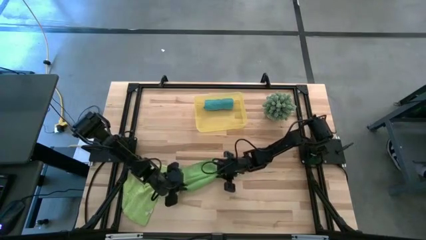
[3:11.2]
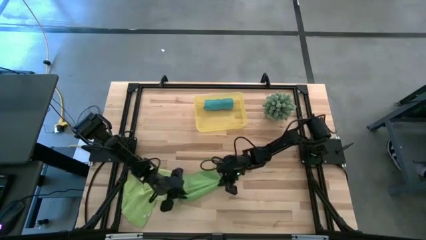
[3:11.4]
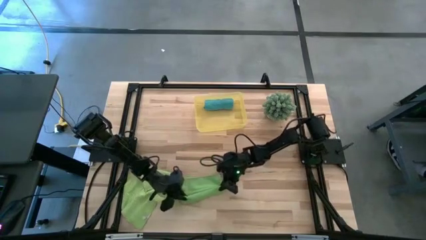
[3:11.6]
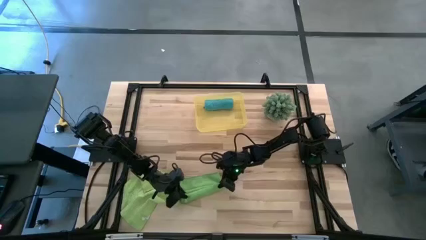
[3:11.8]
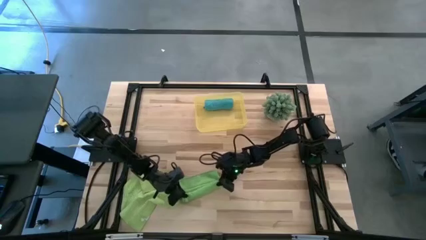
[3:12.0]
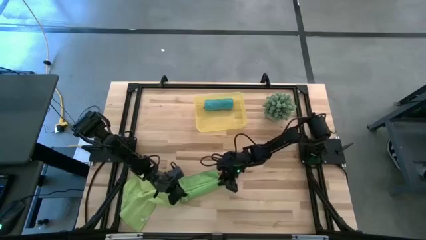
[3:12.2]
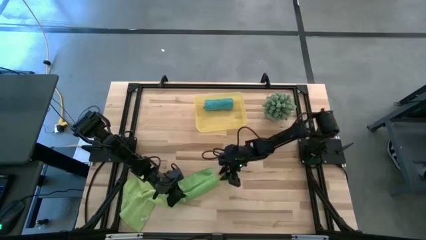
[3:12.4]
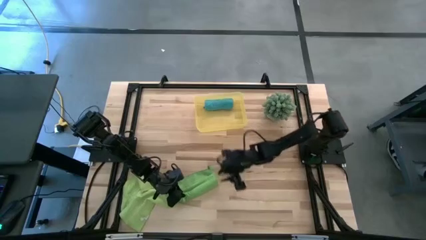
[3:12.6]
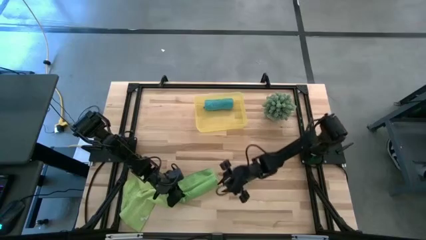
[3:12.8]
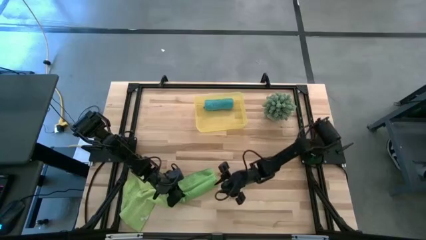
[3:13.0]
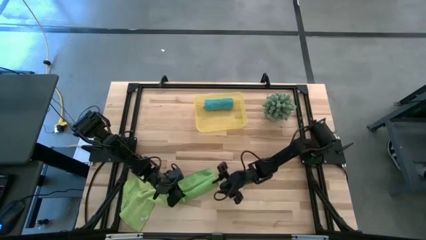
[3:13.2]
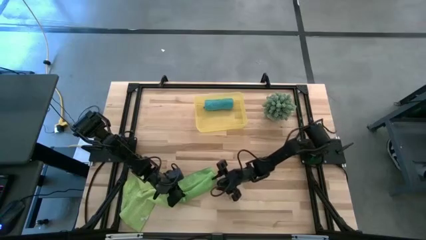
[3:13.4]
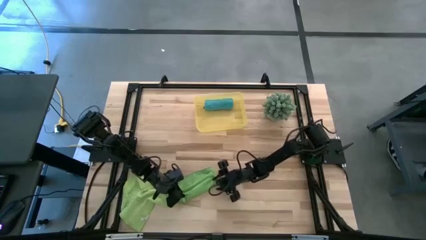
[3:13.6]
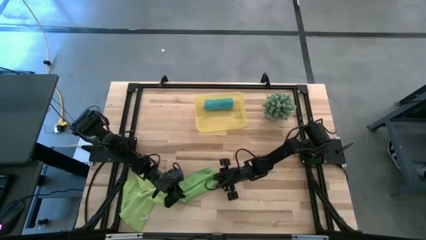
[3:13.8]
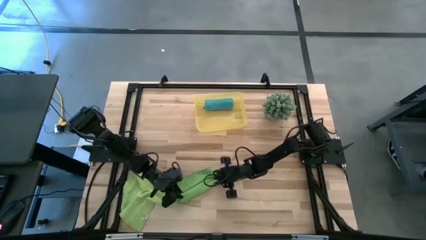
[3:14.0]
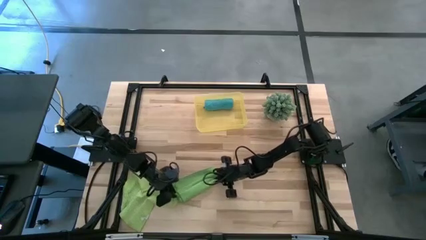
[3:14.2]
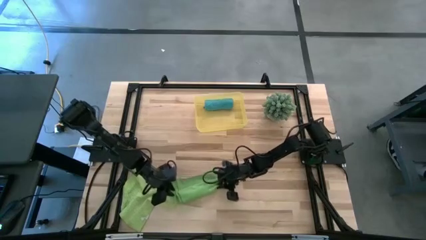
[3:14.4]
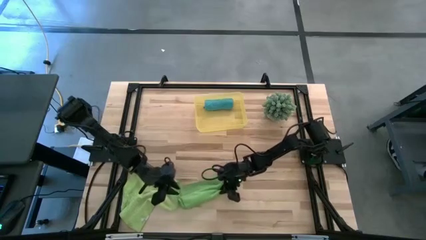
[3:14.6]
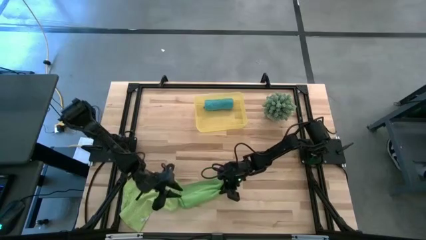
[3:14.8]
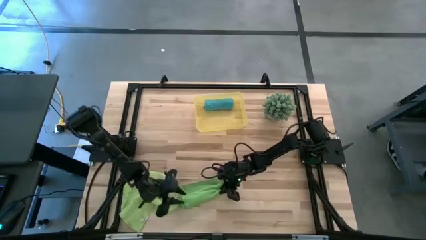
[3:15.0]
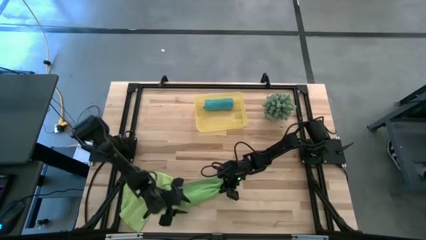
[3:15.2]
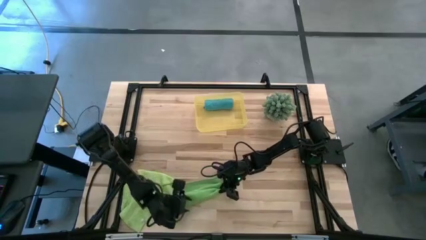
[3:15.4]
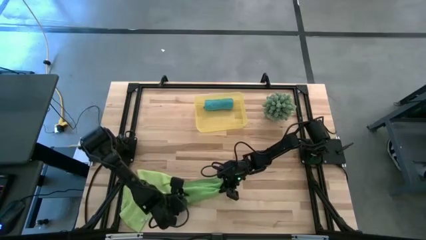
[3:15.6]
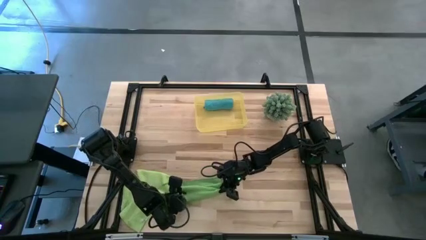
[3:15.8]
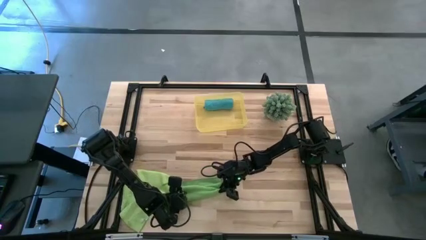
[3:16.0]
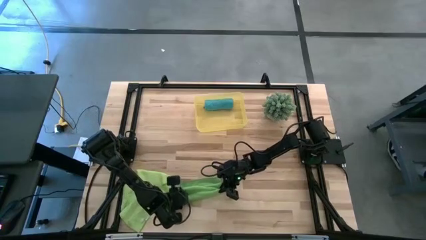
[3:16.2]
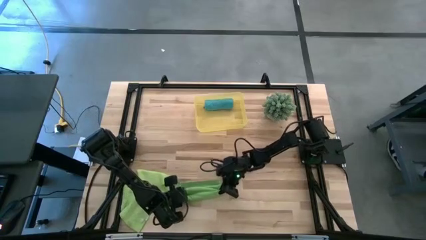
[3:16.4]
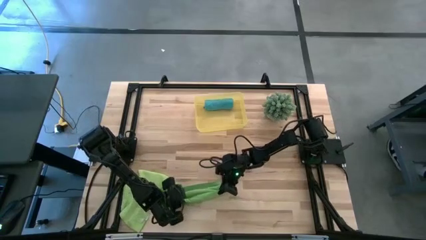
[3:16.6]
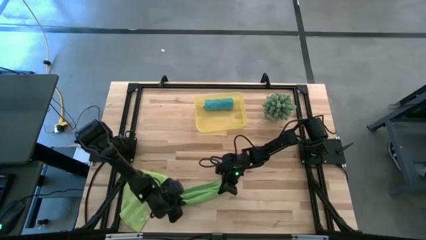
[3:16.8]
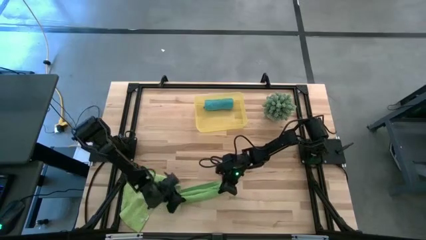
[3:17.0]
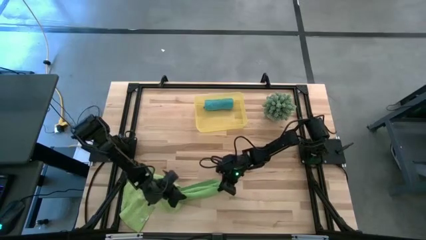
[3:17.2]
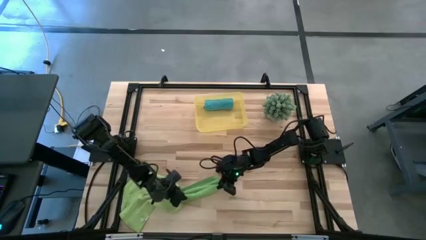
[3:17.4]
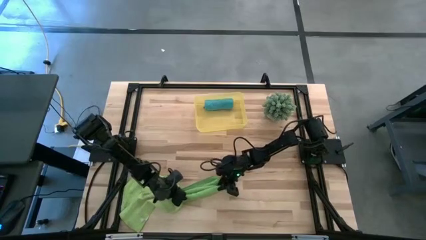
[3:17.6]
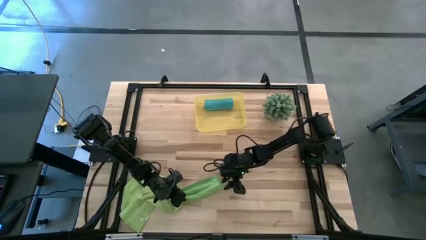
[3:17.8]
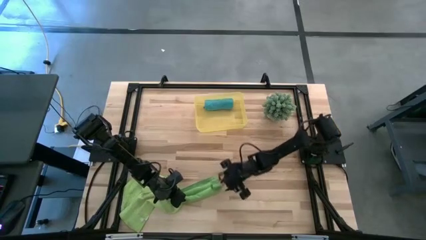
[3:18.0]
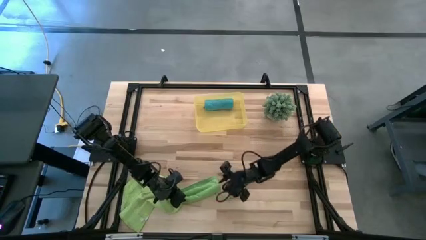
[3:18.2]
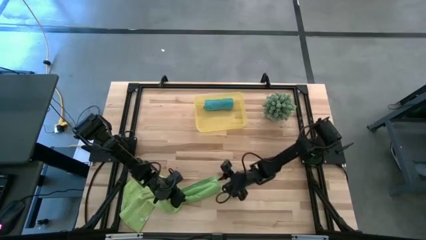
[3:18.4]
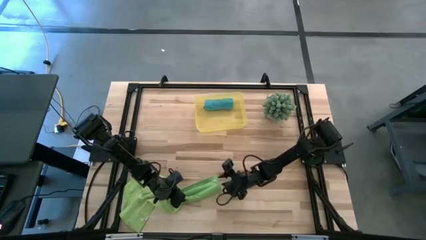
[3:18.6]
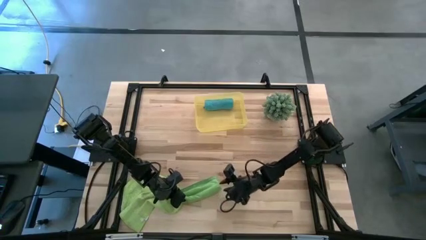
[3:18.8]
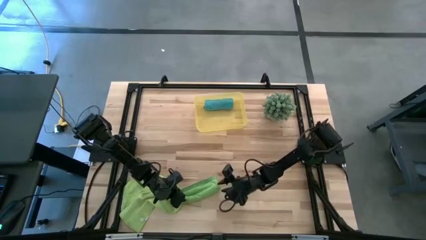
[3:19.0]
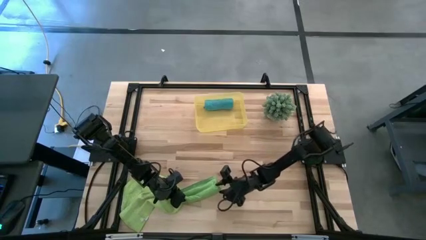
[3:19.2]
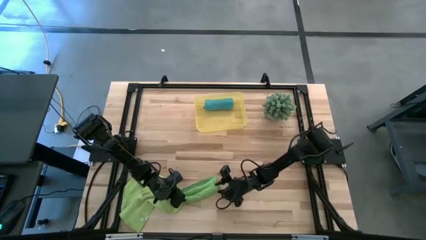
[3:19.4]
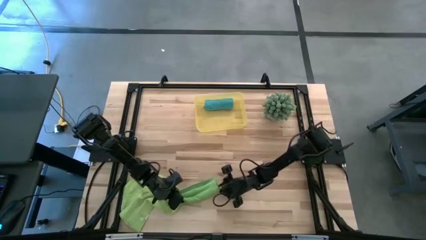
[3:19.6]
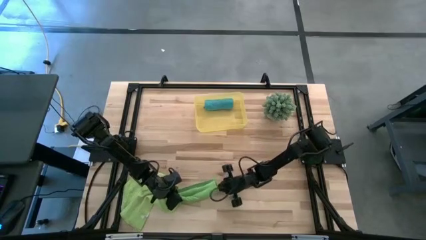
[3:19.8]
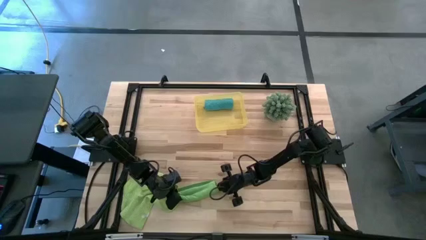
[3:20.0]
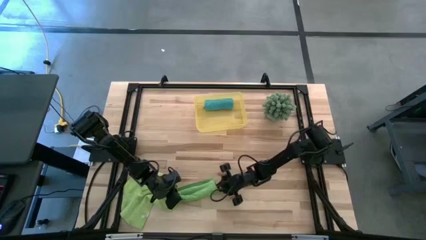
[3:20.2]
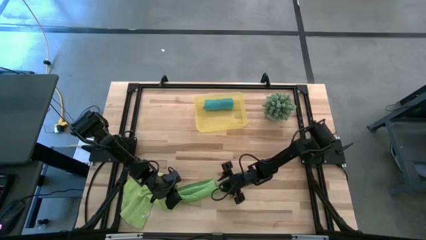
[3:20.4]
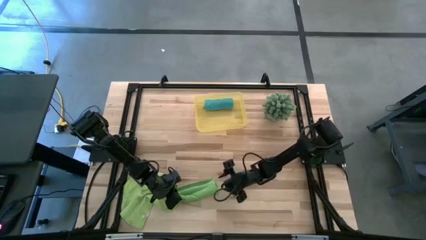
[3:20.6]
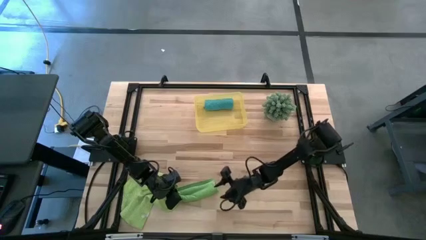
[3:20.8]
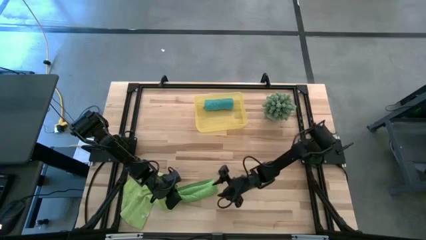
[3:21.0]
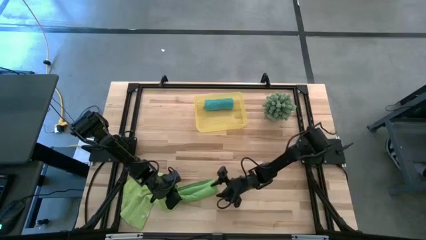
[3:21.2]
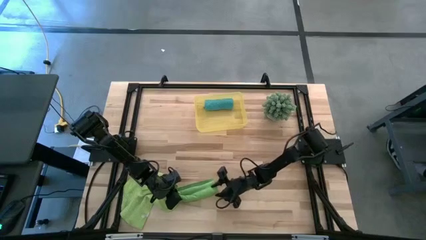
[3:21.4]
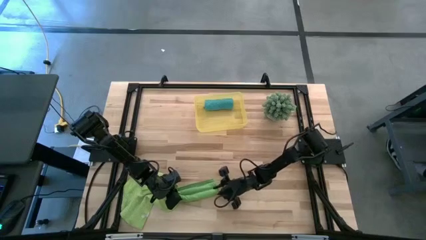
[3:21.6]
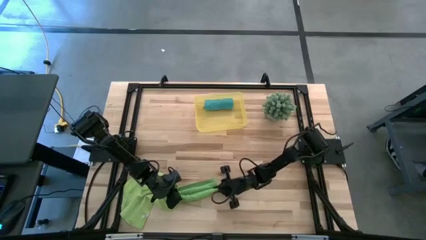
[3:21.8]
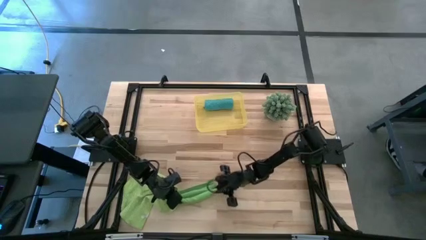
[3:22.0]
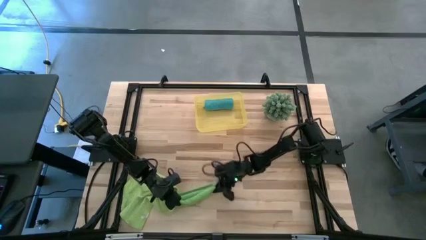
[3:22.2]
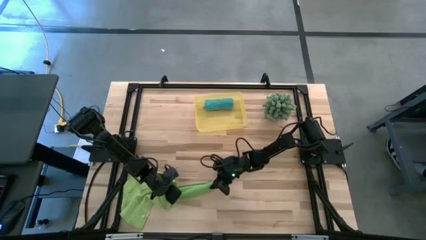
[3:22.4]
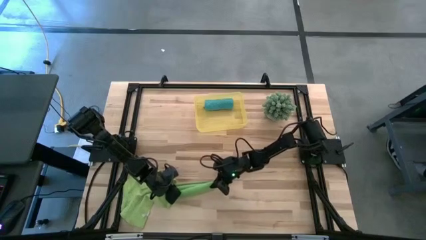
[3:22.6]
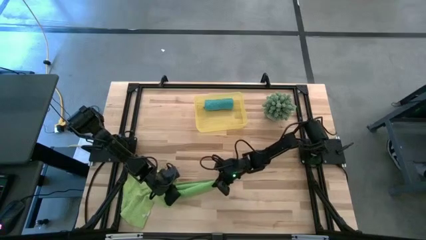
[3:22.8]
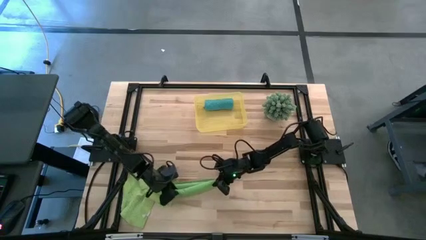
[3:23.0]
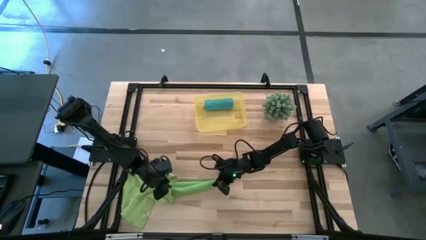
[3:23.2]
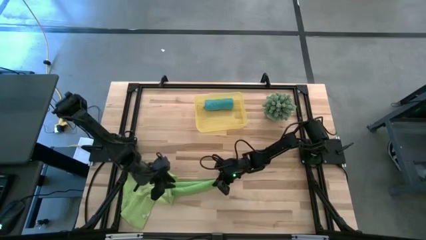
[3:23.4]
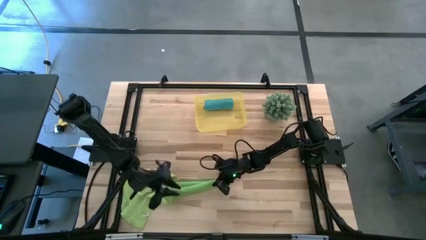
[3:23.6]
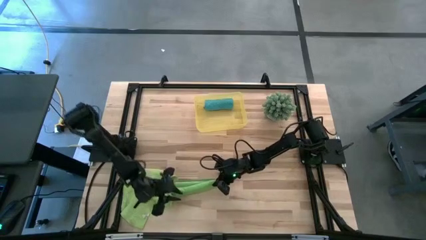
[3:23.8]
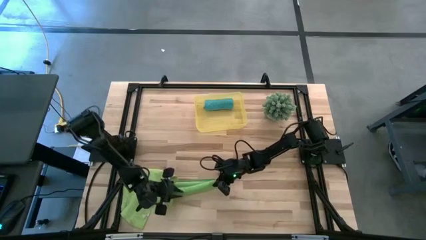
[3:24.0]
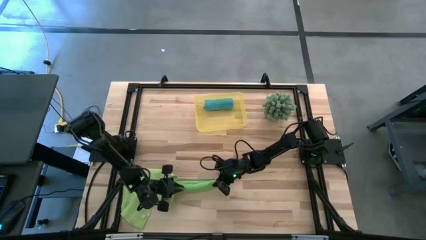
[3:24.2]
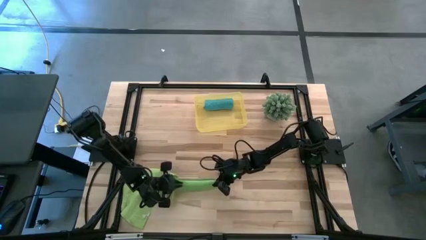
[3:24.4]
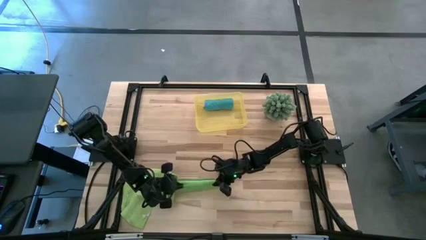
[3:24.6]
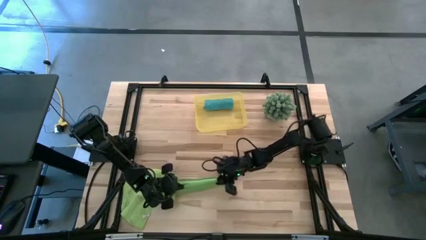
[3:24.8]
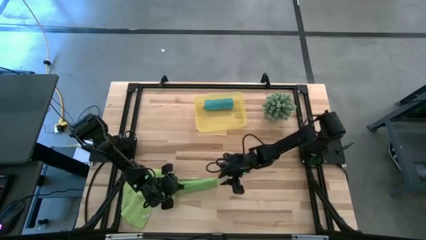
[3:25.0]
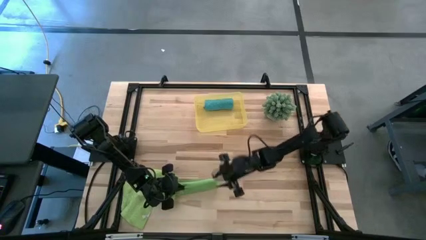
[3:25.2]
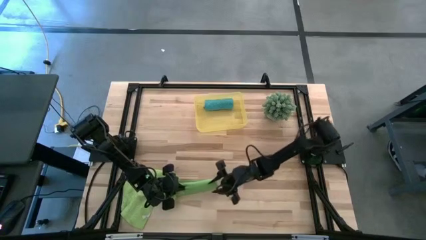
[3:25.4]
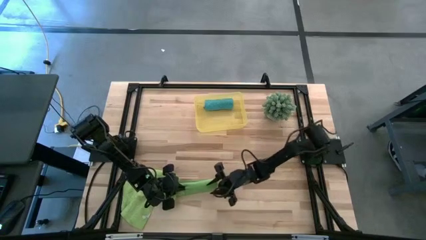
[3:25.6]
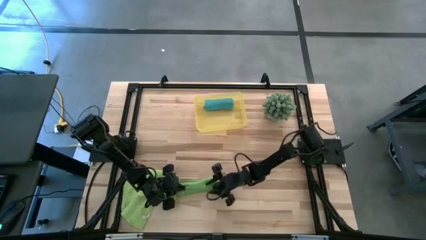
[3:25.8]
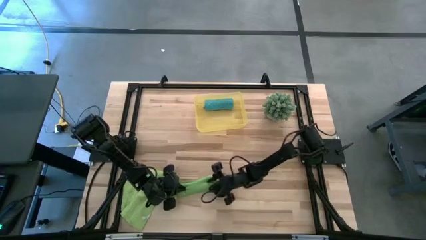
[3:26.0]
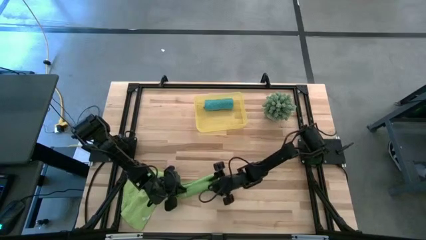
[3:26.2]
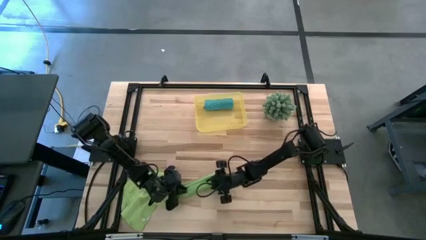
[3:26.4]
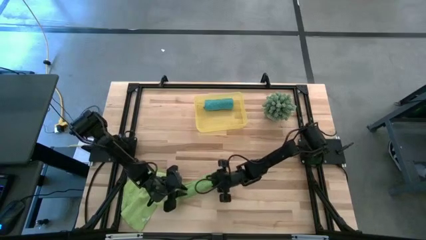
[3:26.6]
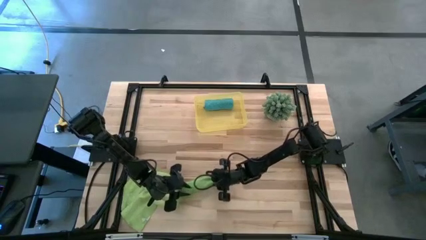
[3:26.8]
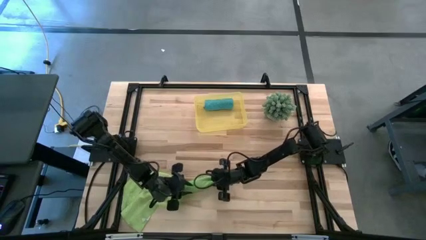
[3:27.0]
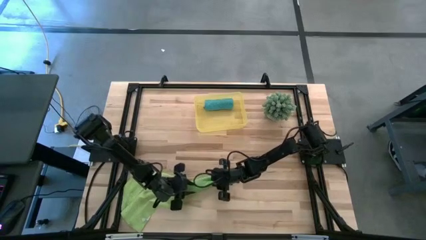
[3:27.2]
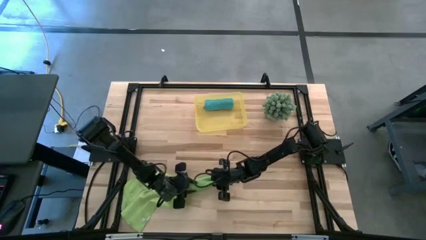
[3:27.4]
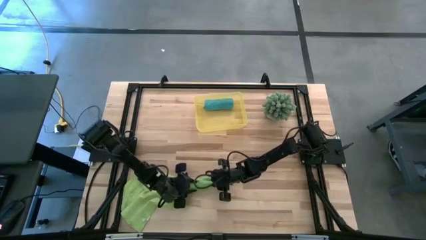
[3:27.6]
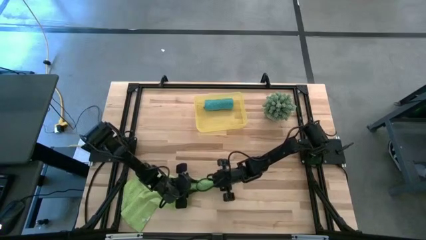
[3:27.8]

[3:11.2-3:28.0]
Task: Roll microfiber towels into tight, uniform cylinder then place into a basket
Roll the green microfiber cloth
